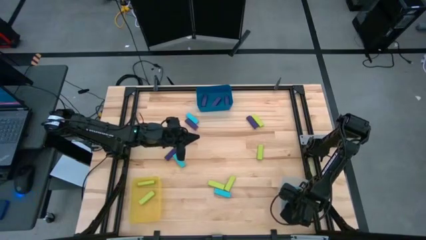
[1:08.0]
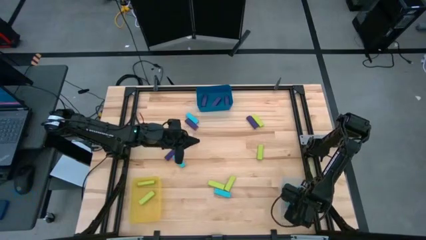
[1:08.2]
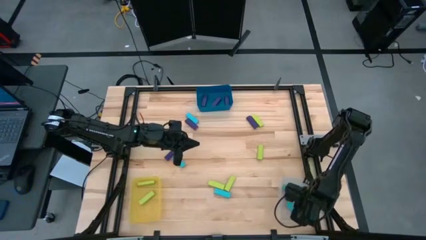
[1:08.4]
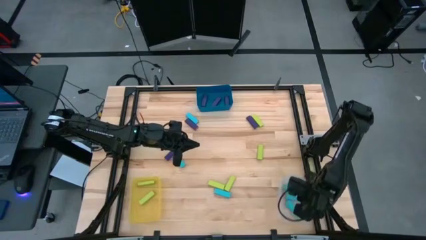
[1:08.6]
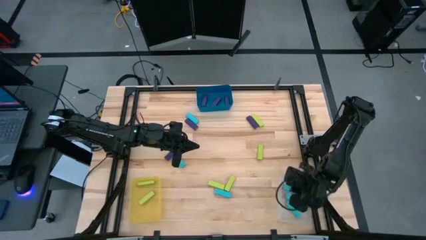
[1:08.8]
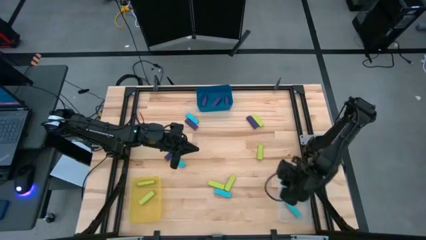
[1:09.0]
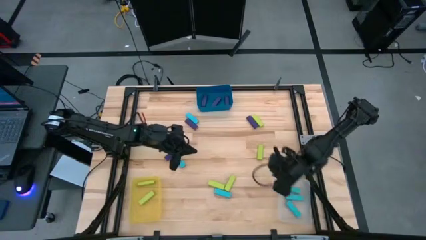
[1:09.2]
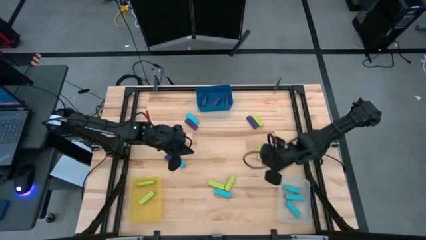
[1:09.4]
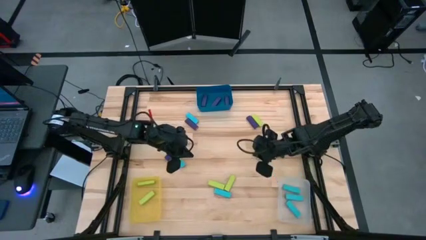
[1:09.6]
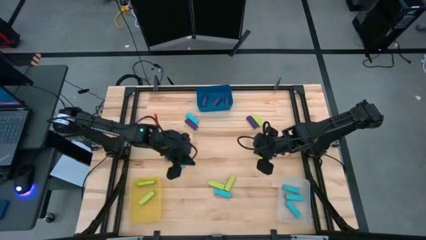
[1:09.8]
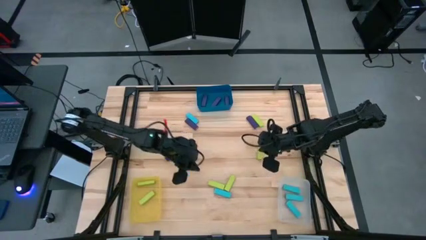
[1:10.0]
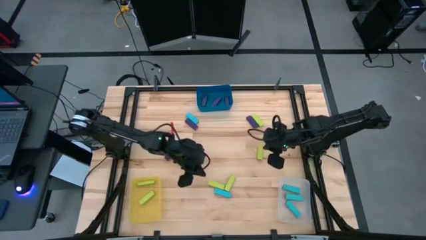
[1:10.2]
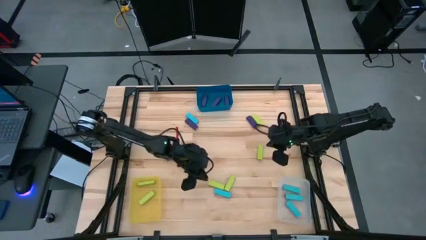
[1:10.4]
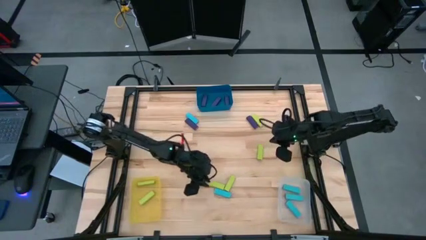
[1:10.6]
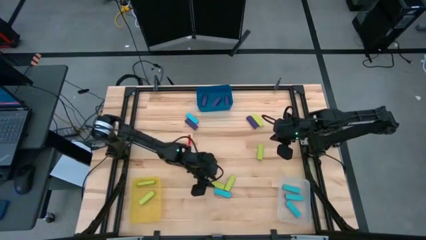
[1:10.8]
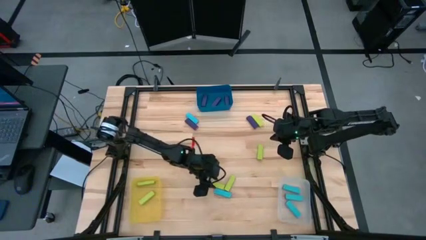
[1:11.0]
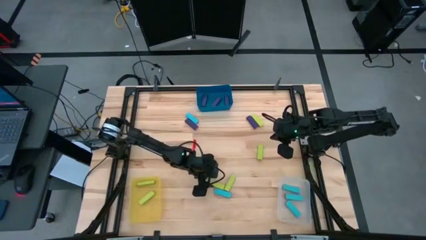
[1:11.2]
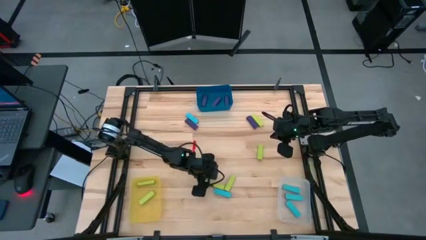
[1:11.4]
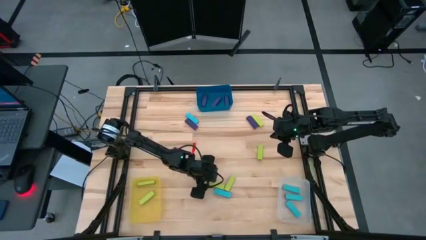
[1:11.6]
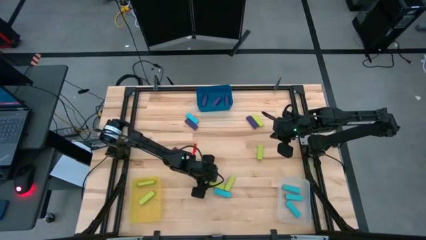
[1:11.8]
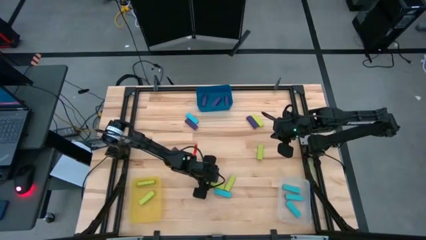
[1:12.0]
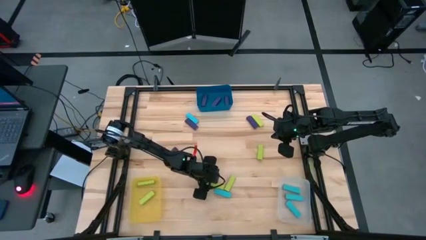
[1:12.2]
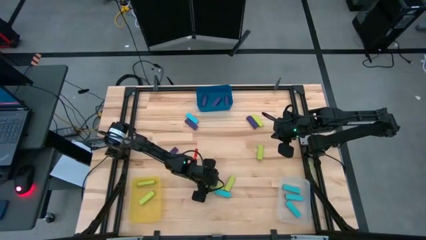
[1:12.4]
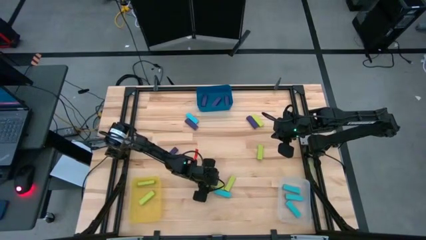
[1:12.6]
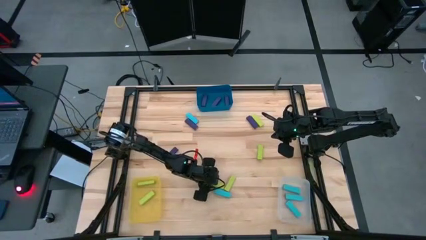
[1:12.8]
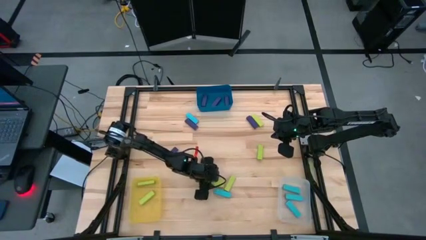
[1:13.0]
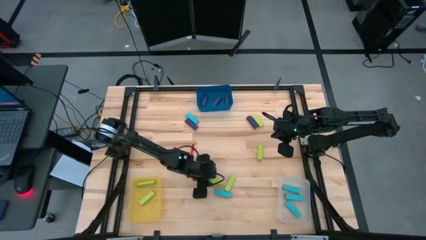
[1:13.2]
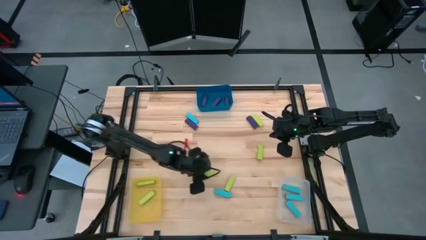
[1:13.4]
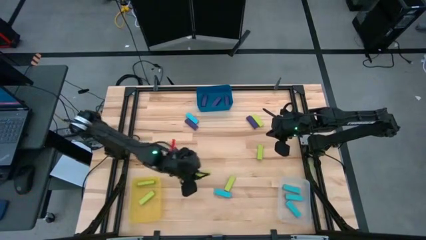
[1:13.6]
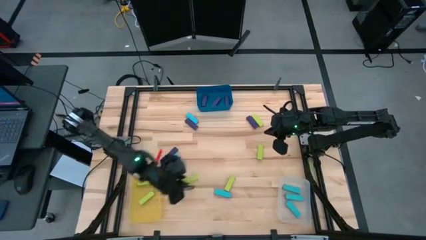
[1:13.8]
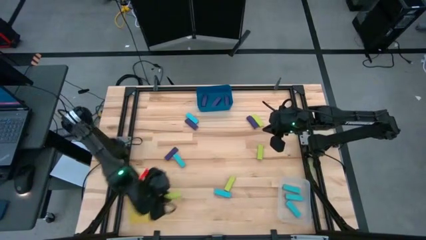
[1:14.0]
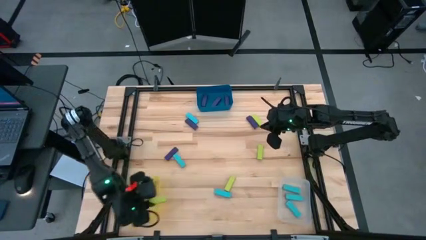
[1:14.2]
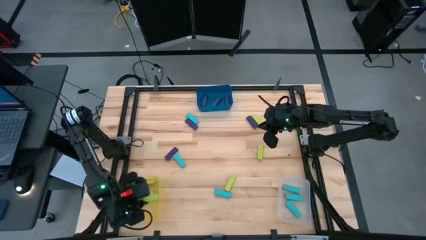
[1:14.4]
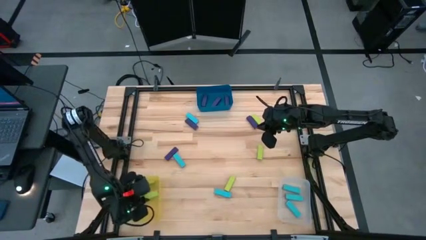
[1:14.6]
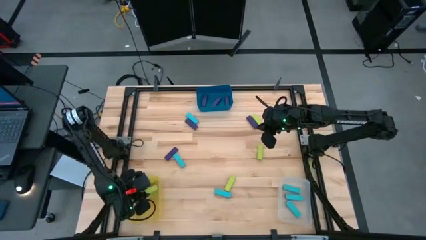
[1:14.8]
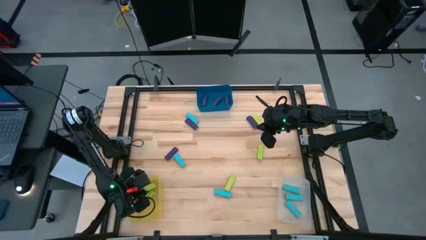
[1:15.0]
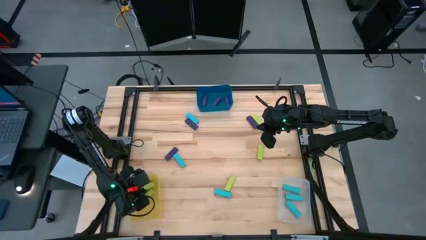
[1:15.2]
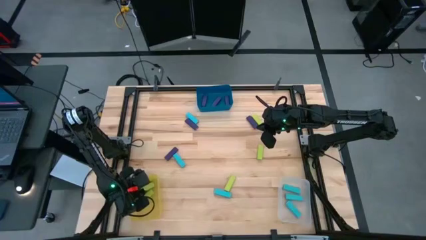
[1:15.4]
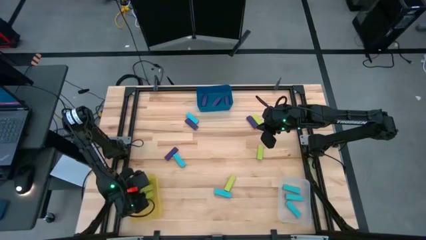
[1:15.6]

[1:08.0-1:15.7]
Task: Sort blocks
Put the yellow green block into the yellow bin

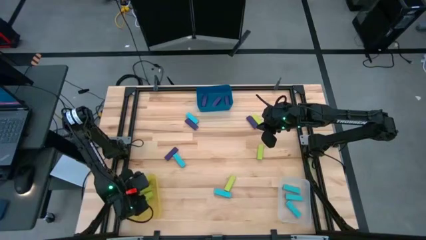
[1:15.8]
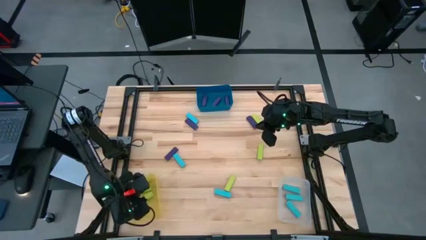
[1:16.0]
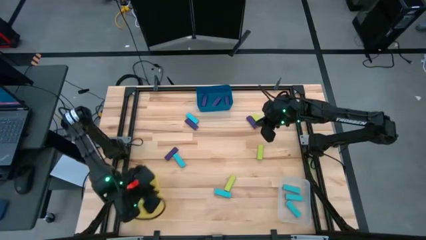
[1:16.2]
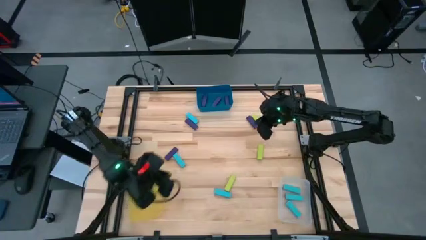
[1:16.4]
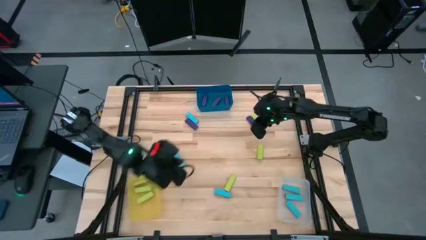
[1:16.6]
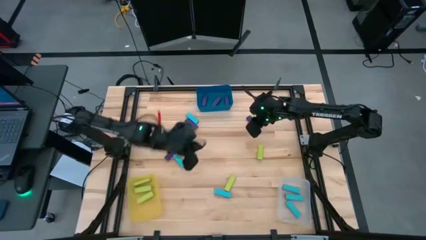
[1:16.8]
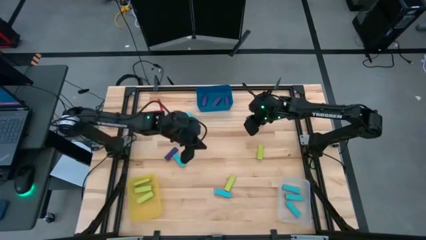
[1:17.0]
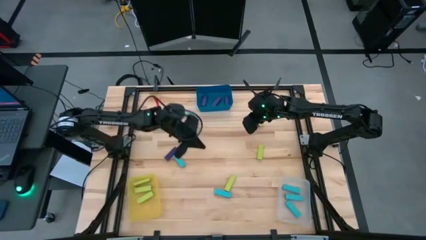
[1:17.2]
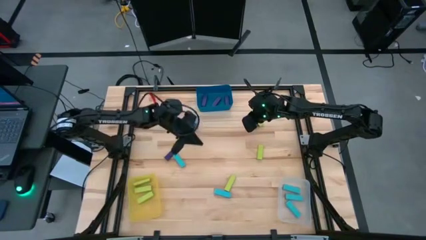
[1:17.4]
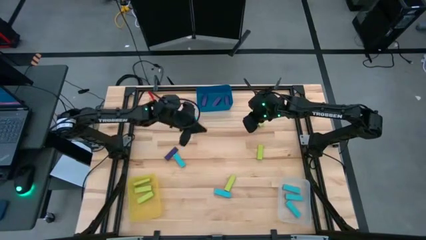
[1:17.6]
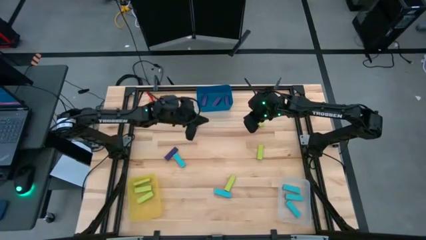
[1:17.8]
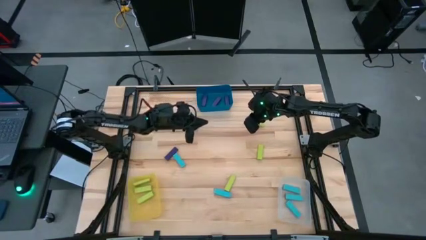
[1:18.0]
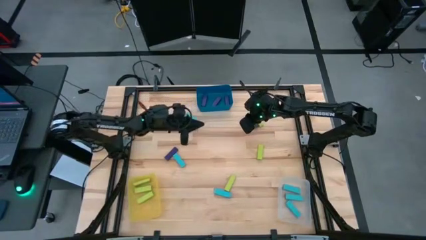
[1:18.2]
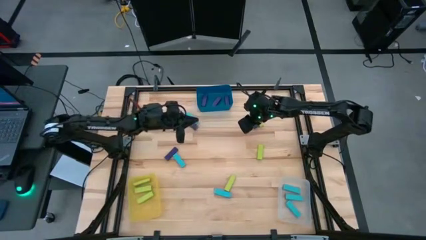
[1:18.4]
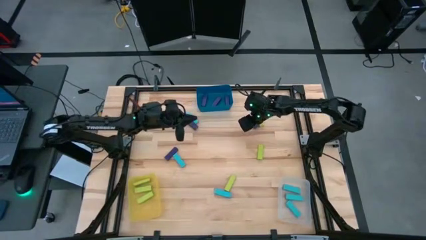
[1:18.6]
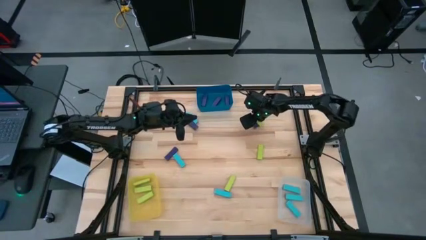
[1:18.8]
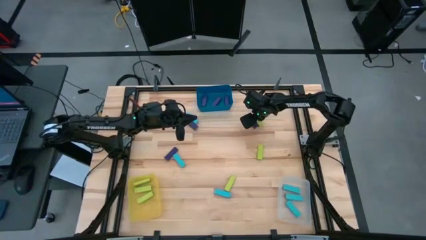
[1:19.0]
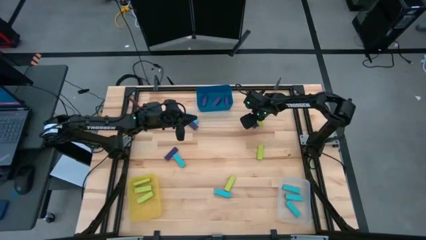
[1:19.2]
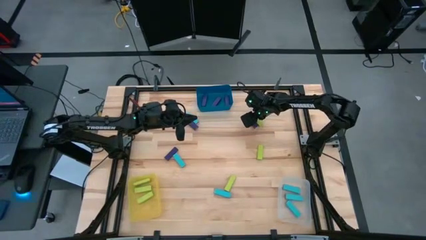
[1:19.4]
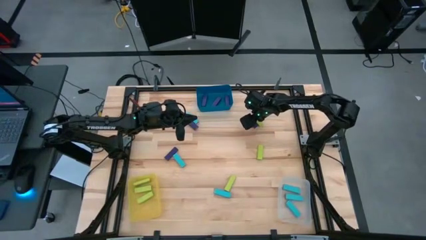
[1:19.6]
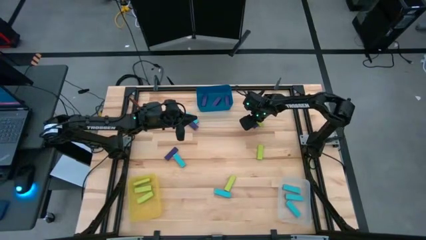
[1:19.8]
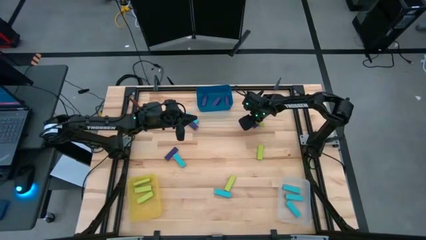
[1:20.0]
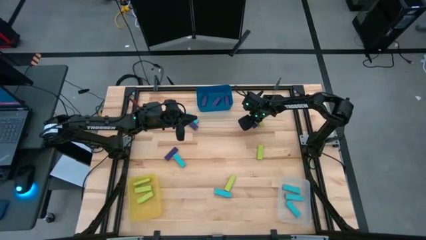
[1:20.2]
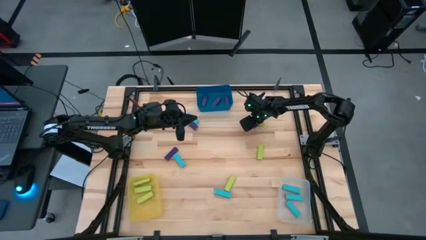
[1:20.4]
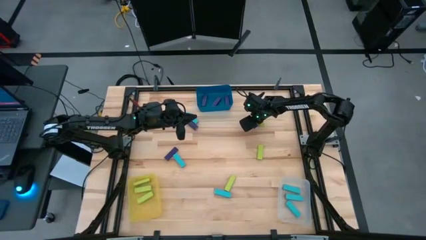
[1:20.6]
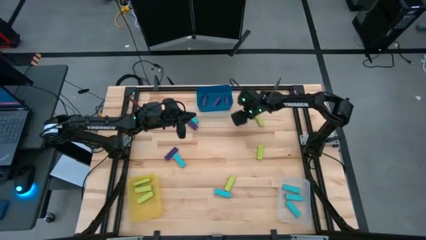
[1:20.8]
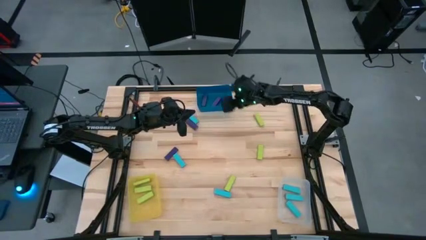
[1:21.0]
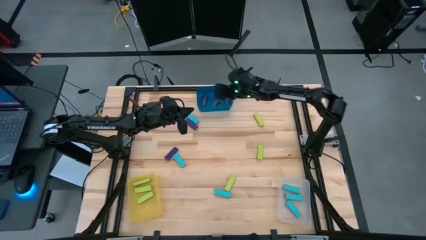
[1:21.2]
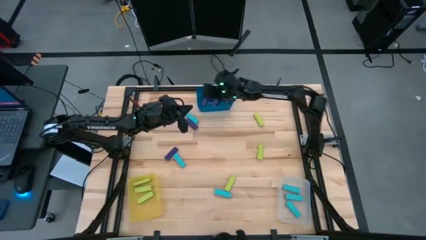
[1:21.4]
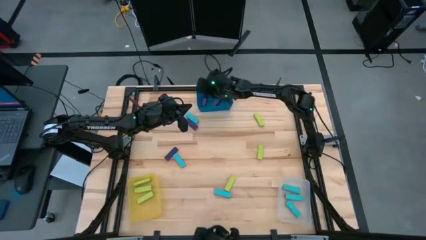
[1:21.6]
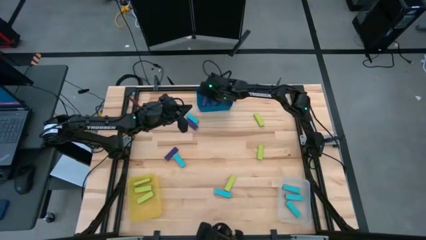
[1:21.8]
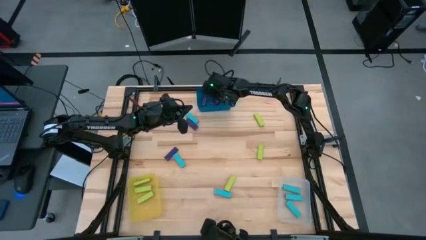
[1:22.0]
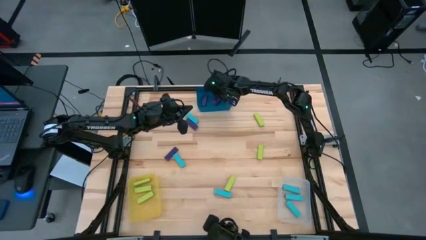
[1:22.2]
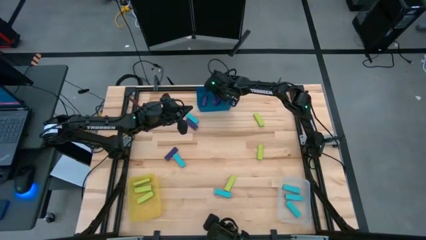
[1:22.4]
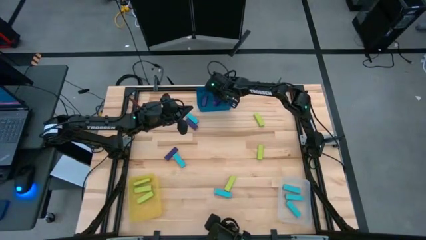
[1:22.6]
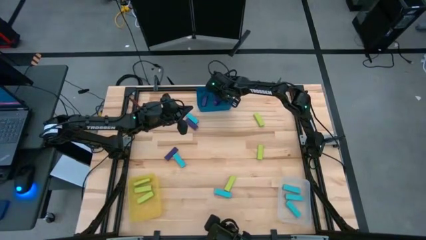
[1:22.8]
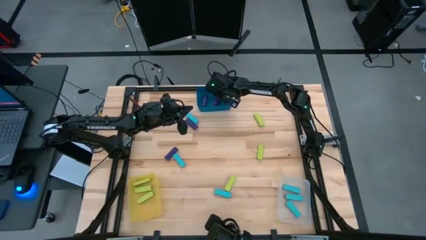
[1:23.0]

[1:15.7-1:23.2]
Put the purple block into the blue bin
